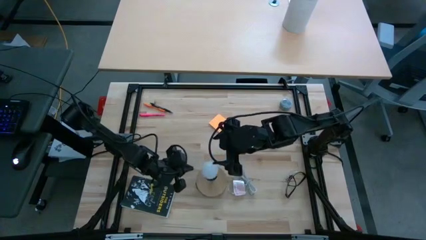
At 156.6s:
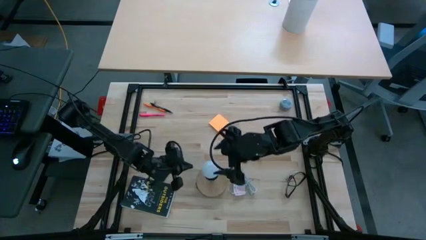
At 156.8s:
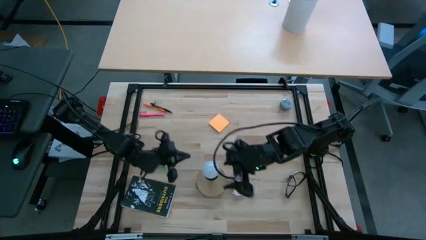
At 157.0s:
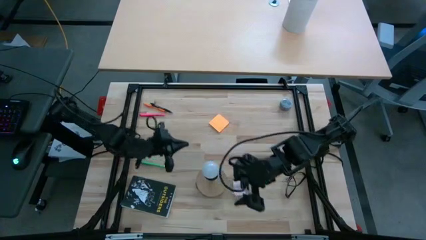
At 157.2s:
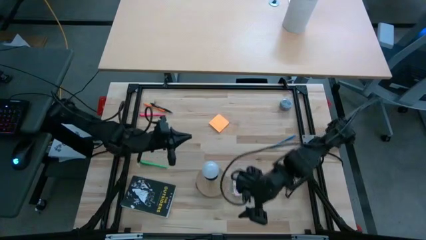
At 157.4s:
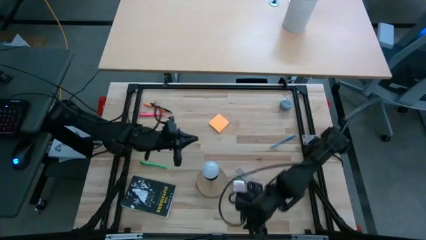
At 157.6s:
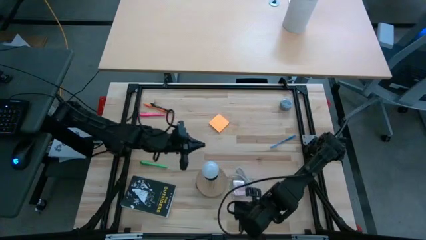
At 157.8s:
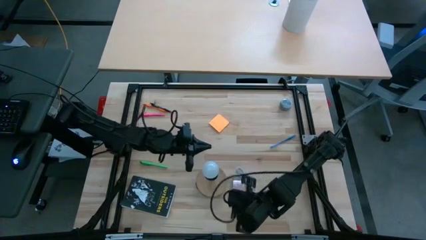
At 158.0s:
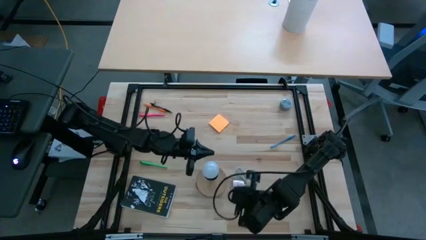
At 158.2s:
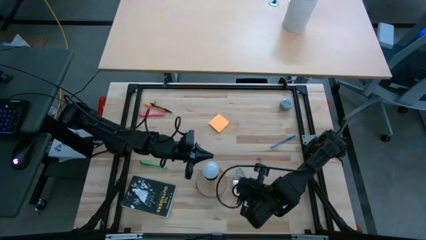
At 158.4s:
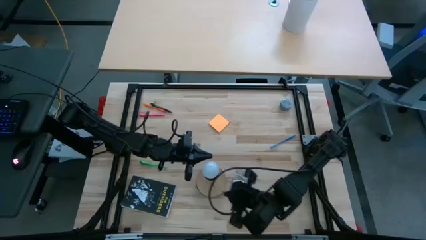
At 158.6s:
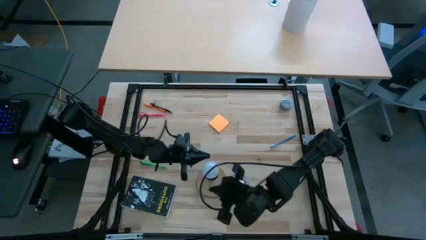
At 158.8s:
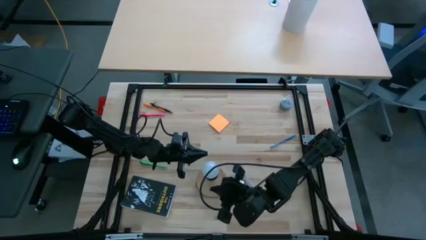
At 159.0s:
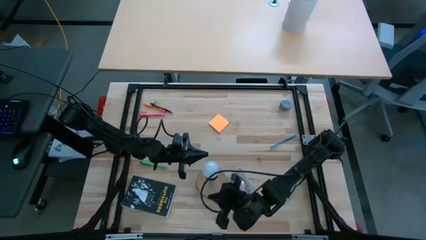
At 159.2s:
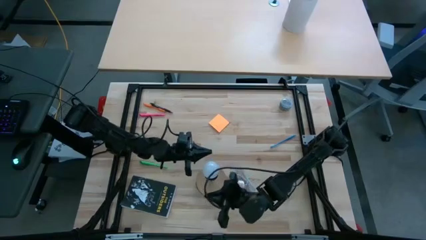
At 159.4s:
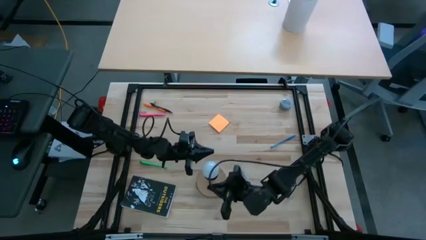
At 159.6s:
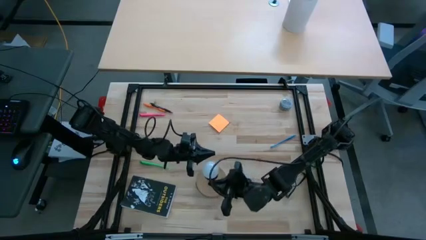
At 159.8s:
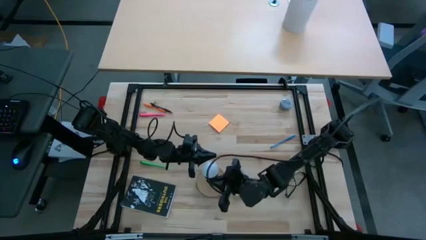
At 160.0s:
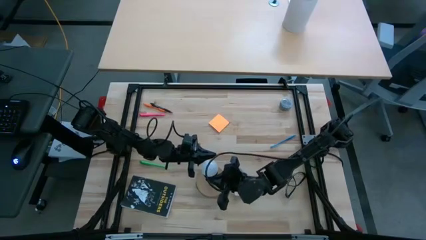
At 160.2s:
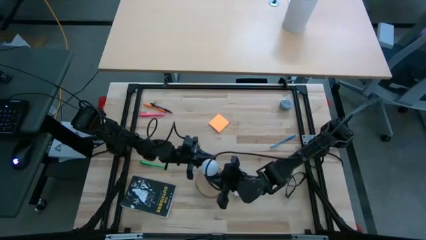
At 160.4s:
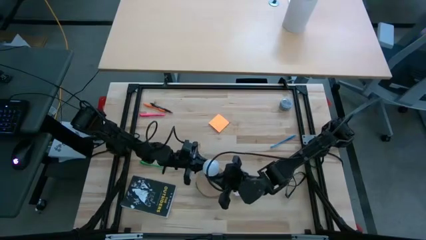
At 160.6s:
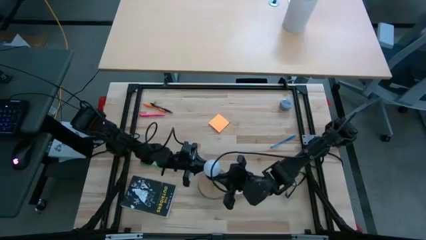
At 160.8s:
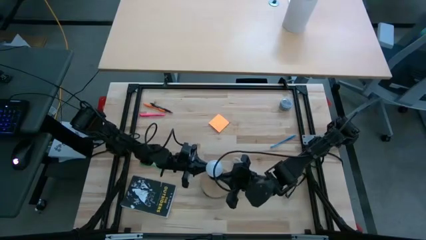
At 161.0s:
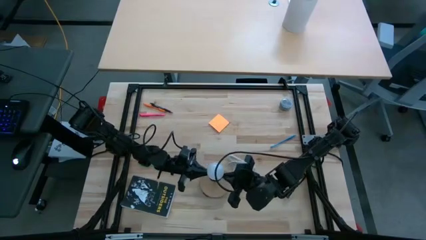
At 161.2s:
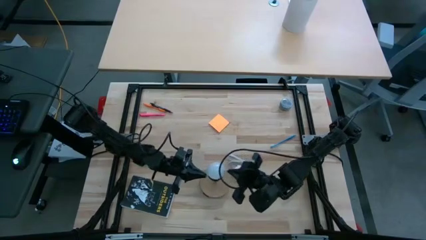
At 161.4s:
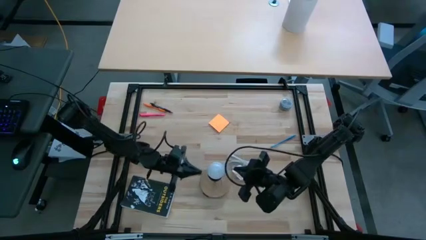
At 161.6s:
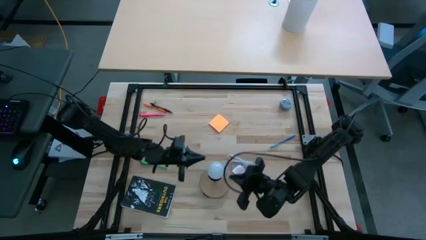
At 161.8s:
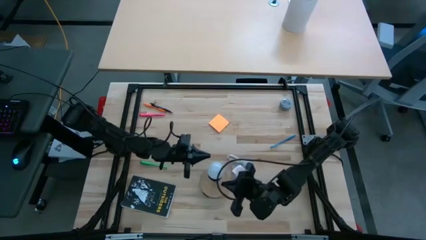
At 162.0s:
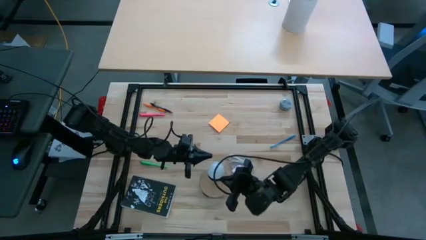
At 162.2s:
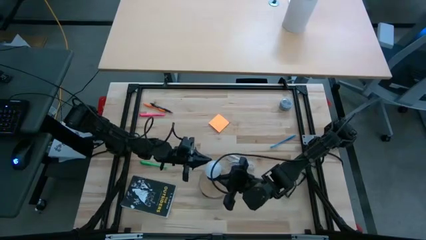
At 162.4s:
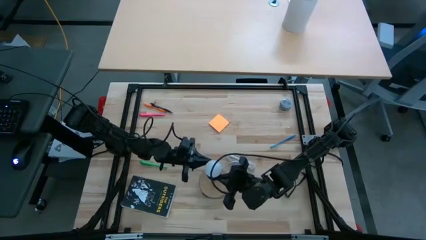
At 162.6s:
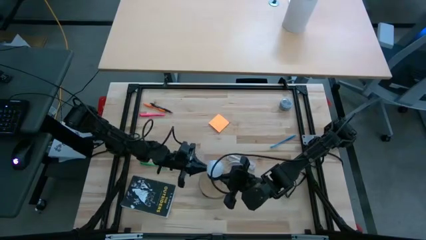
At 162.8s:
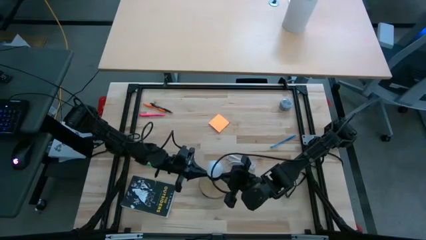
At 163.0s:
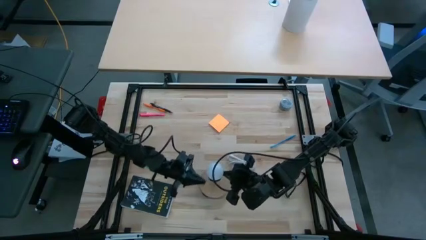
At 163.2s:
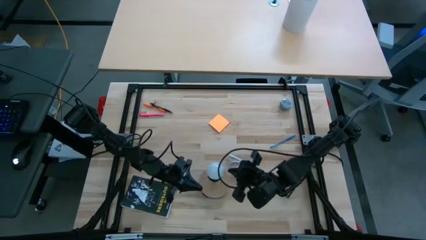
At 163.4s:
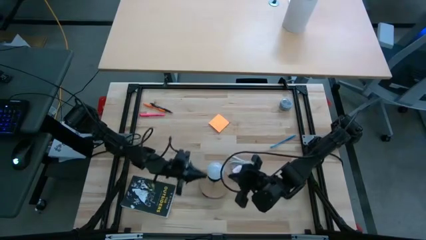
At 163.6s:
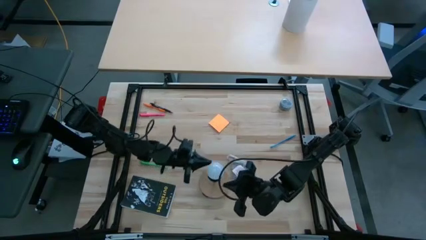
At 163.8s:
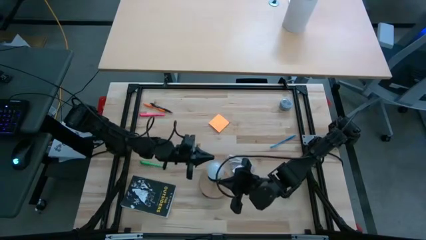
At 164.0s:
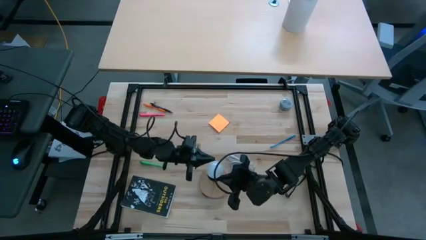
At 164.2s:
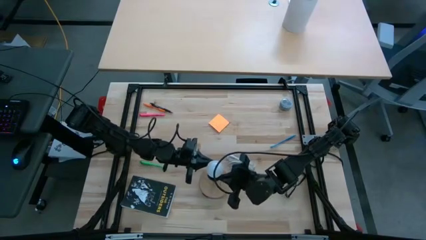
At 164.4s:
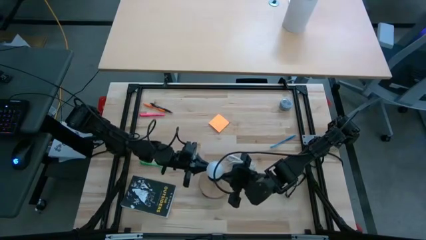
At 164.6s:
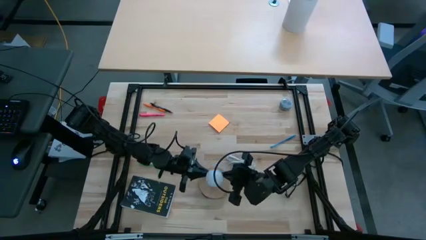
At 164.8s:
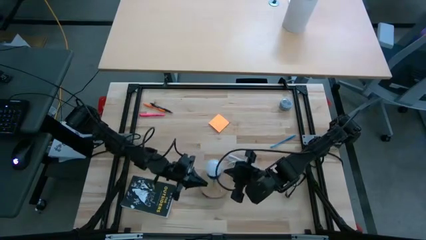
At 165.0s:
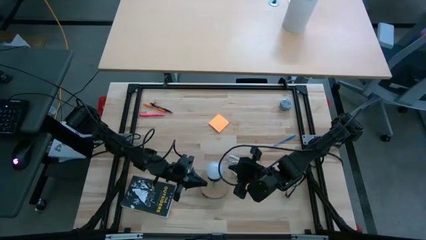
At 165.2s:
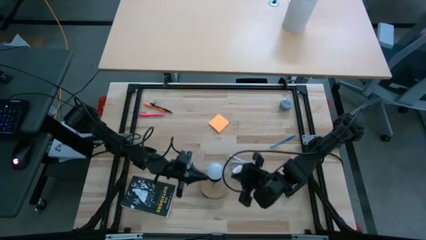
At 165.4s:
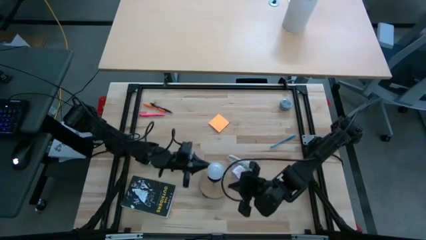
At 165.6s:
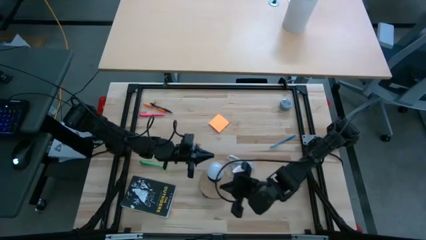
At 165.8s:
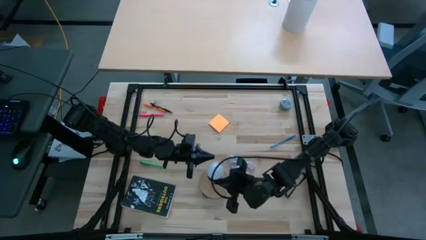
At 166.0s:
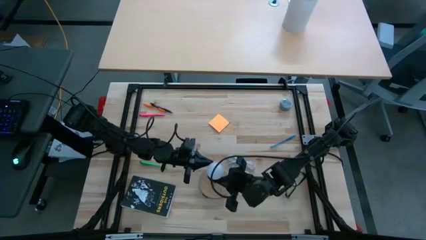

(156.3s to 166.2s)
Task: Screw lightbulb
Remove the white lightbulb from the lamp
